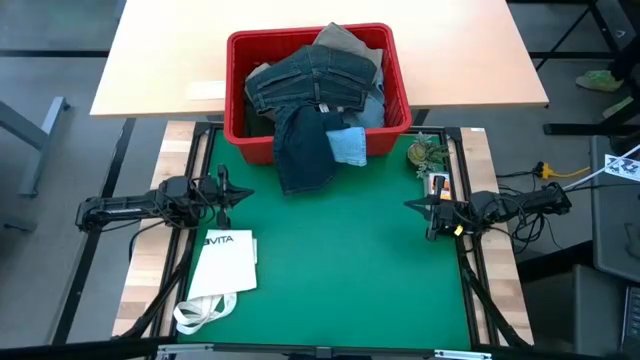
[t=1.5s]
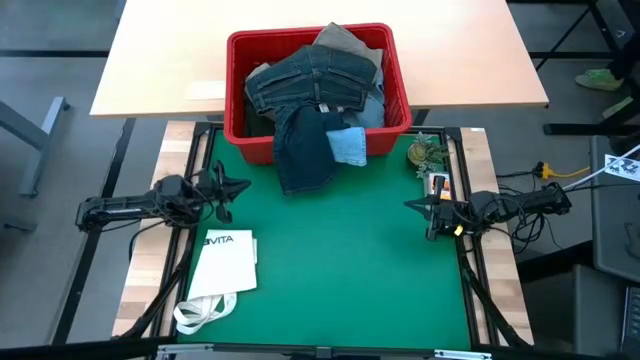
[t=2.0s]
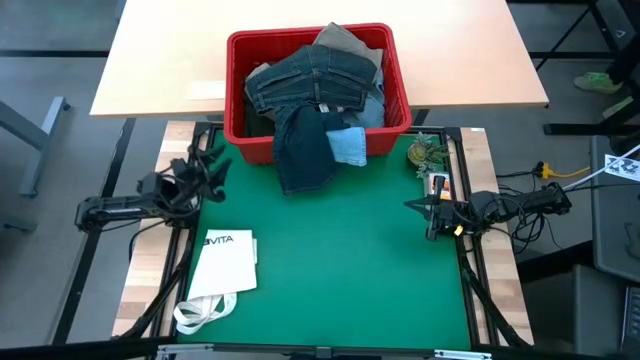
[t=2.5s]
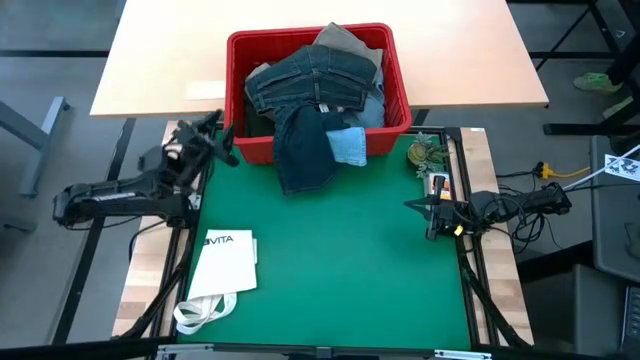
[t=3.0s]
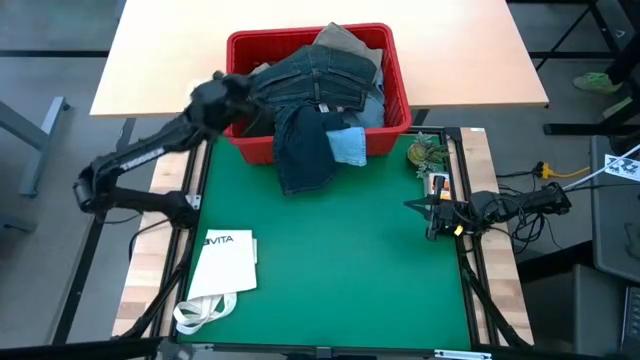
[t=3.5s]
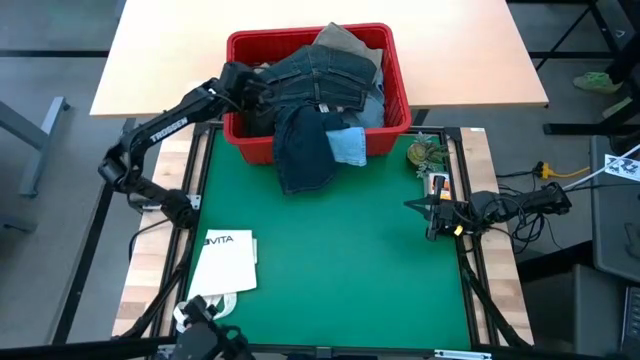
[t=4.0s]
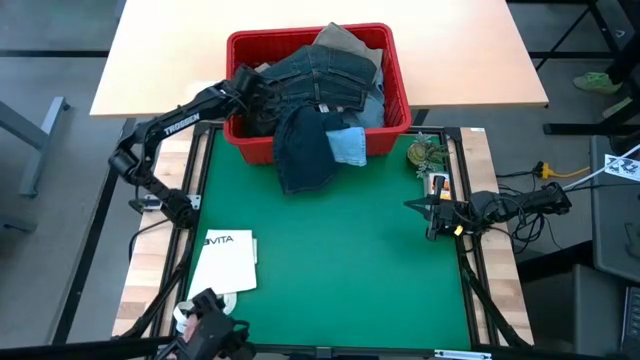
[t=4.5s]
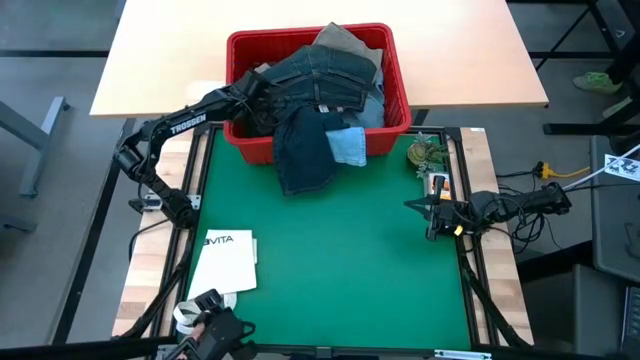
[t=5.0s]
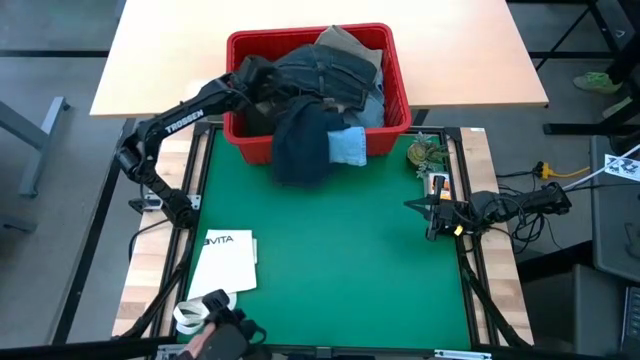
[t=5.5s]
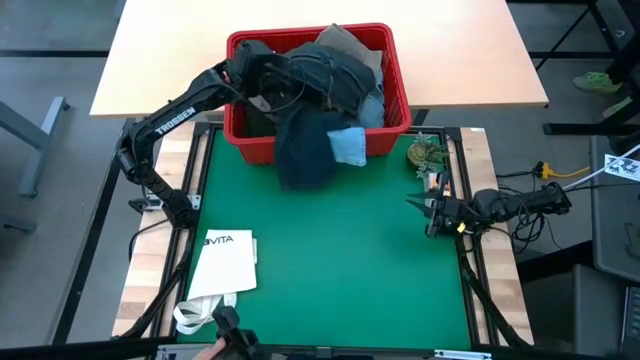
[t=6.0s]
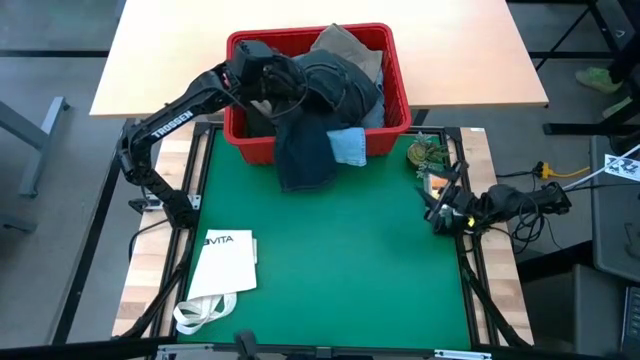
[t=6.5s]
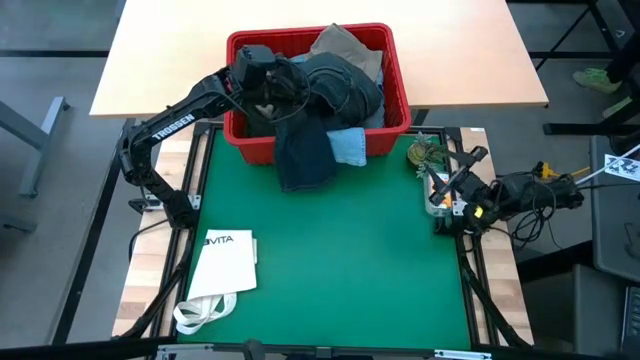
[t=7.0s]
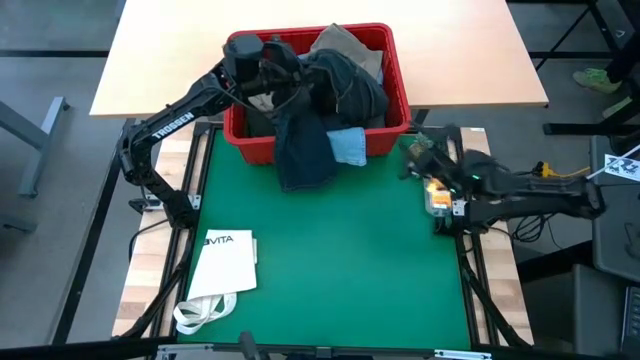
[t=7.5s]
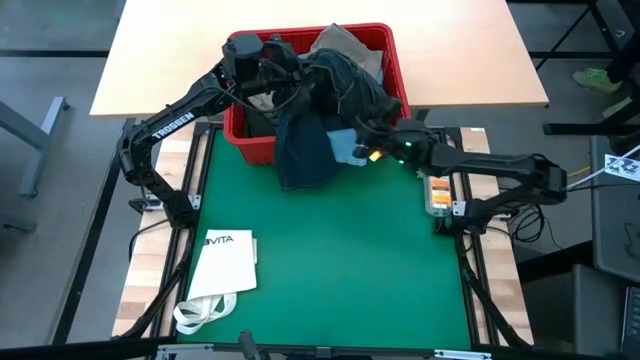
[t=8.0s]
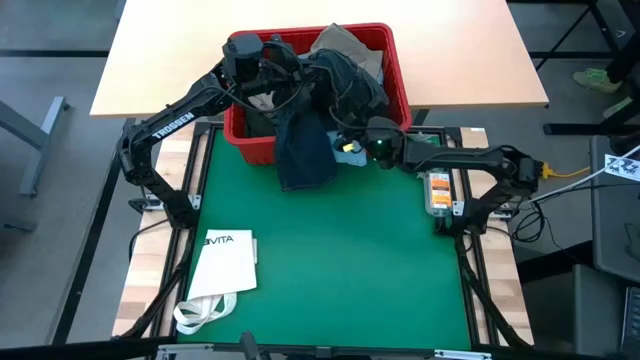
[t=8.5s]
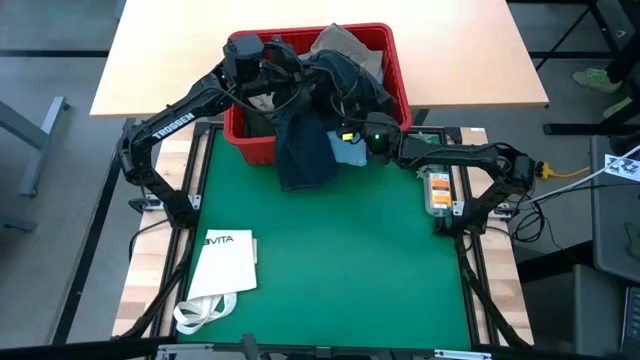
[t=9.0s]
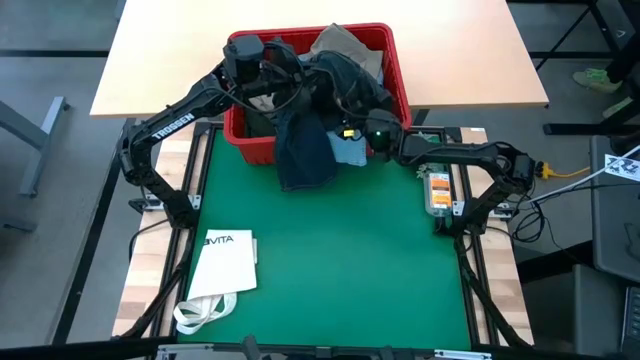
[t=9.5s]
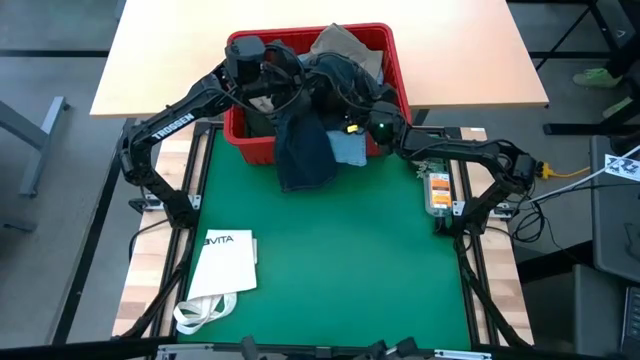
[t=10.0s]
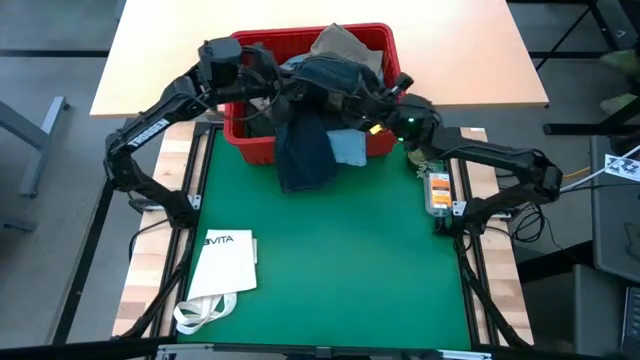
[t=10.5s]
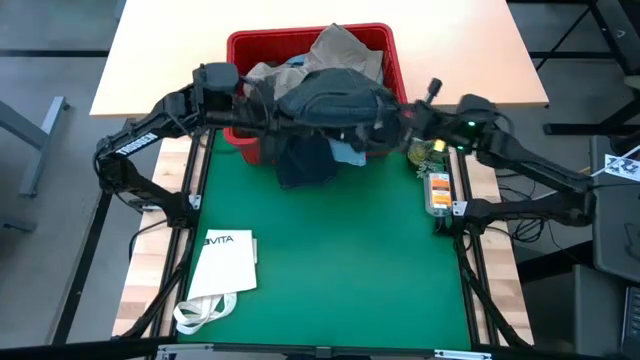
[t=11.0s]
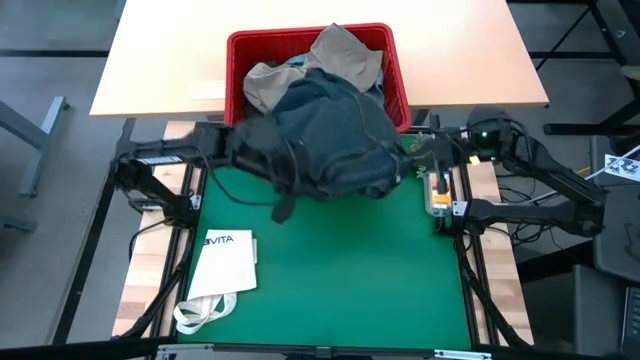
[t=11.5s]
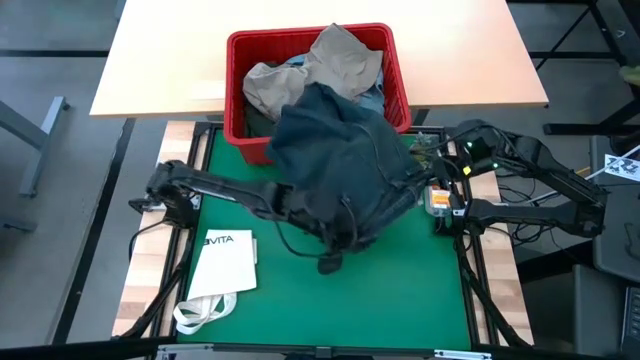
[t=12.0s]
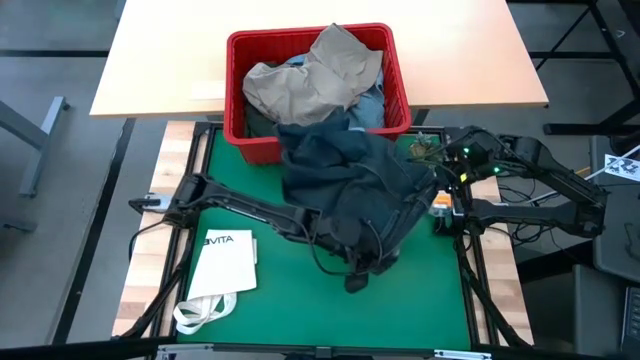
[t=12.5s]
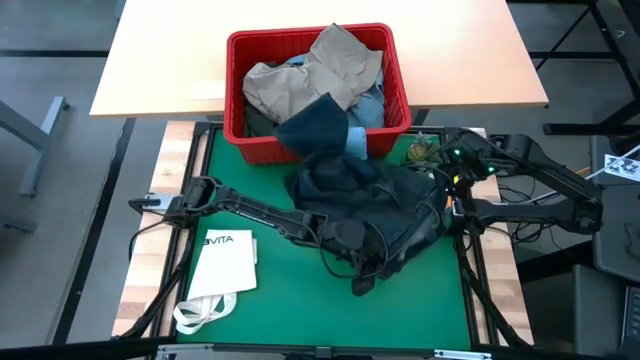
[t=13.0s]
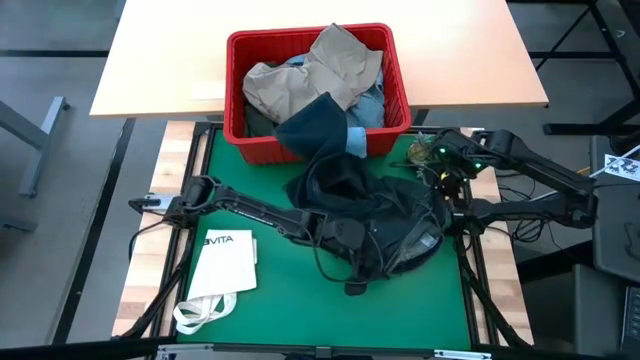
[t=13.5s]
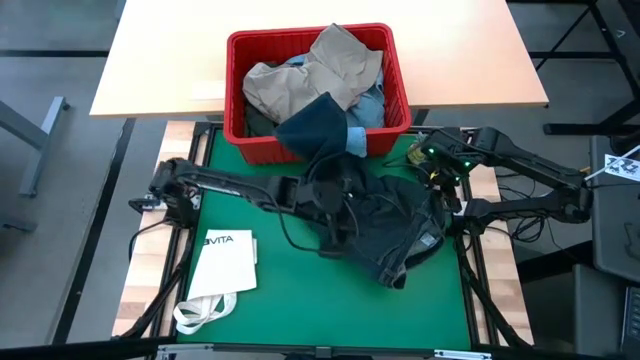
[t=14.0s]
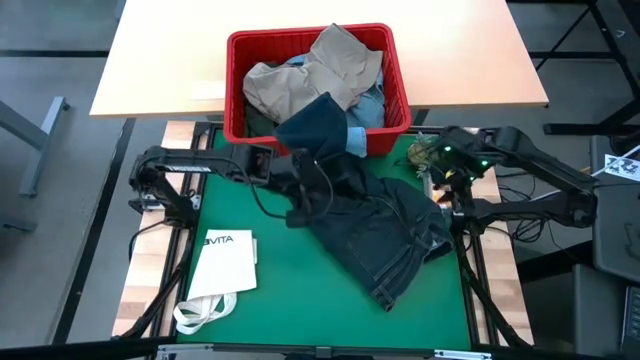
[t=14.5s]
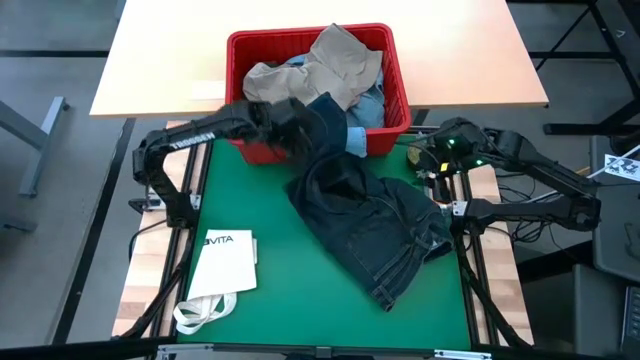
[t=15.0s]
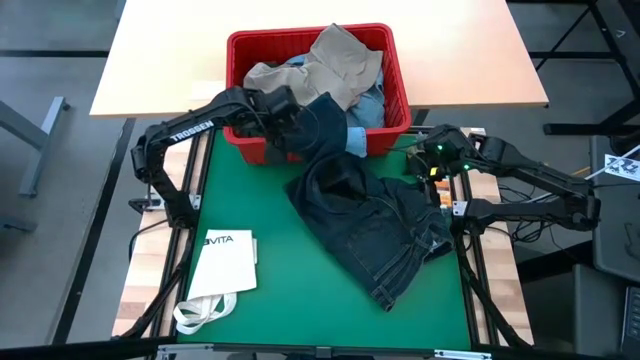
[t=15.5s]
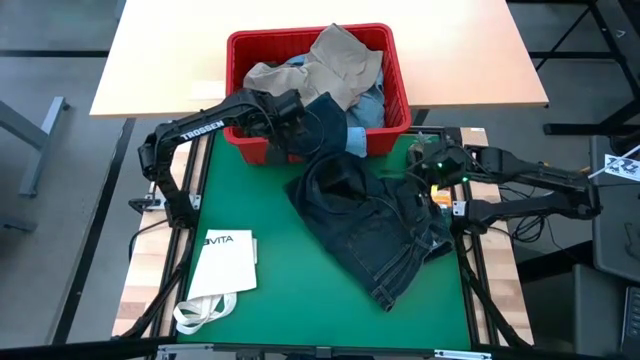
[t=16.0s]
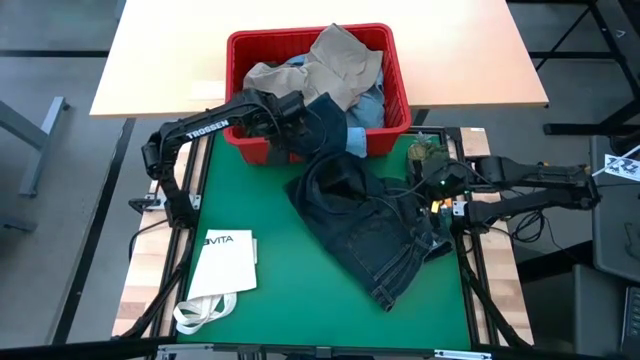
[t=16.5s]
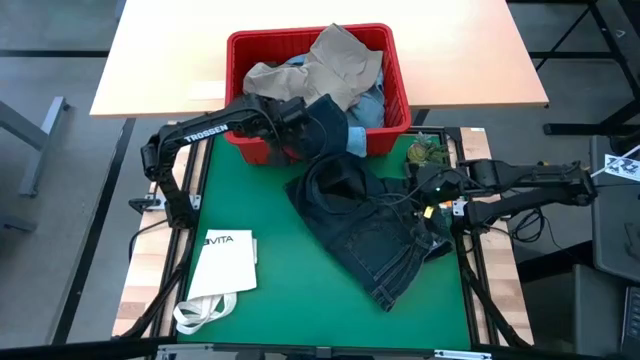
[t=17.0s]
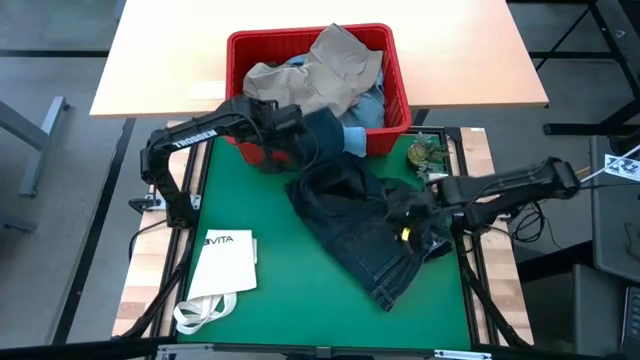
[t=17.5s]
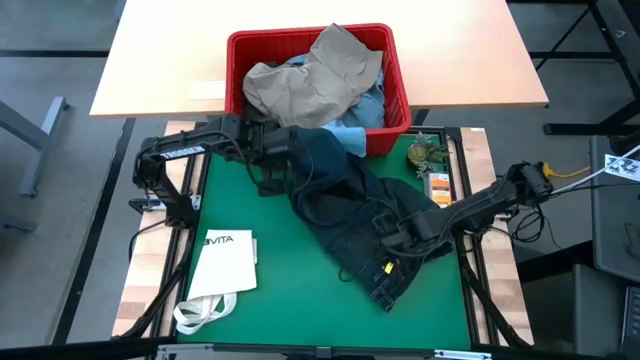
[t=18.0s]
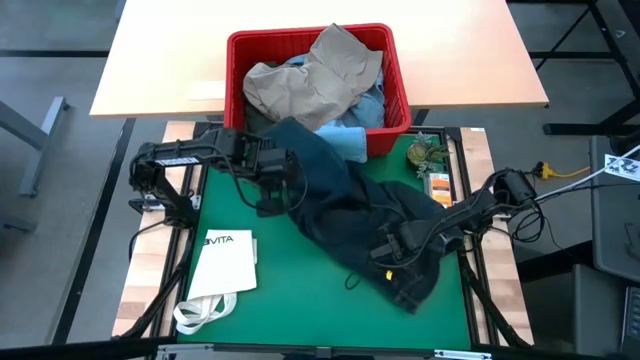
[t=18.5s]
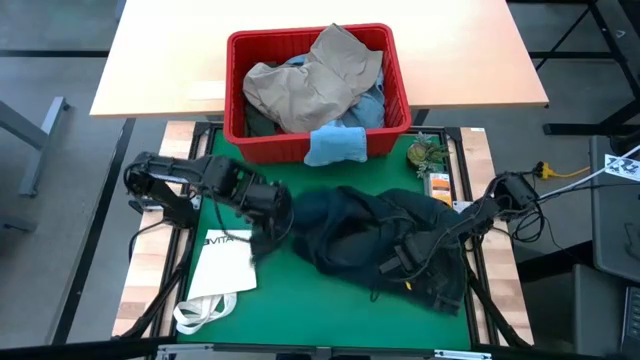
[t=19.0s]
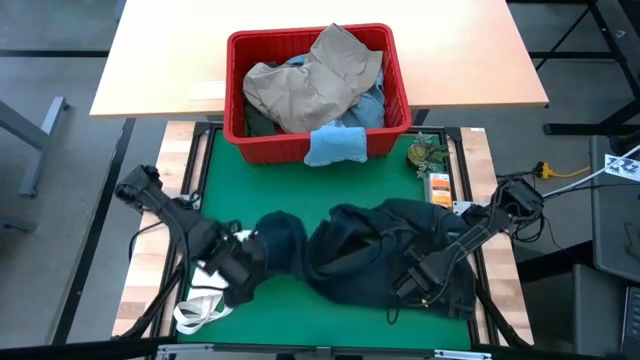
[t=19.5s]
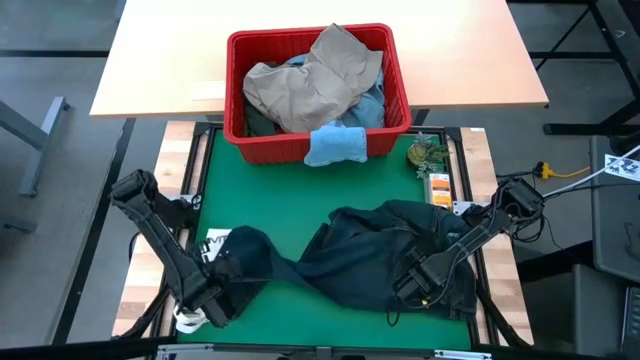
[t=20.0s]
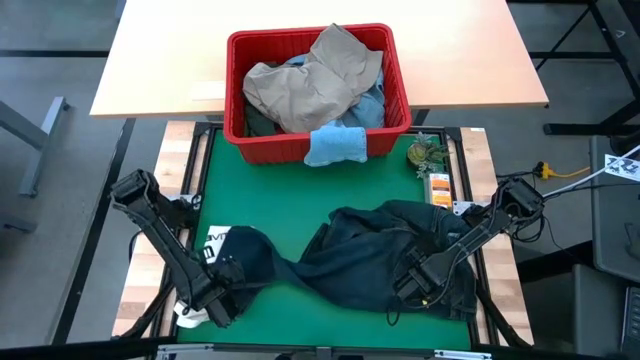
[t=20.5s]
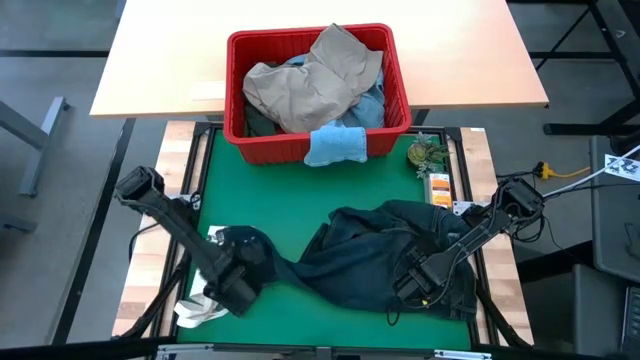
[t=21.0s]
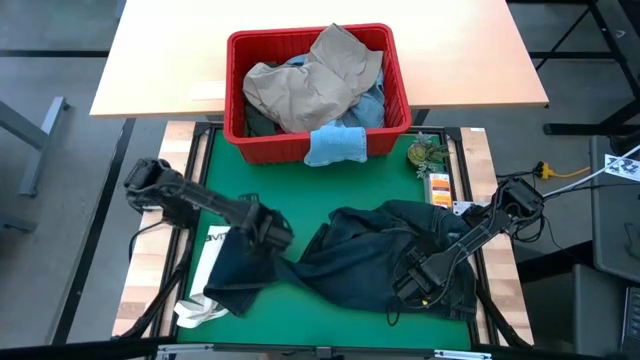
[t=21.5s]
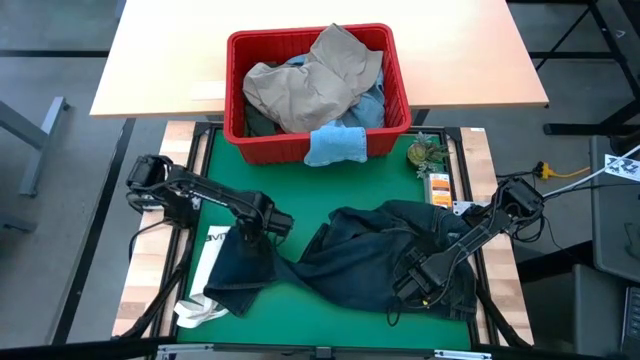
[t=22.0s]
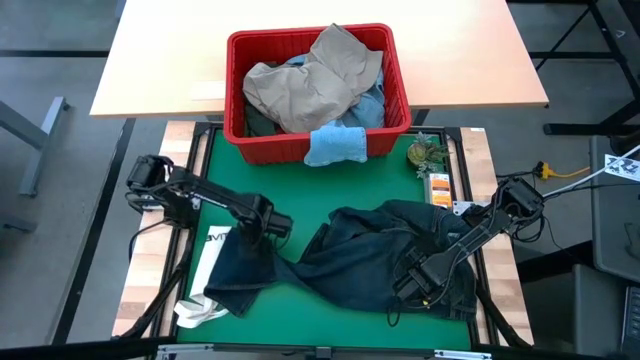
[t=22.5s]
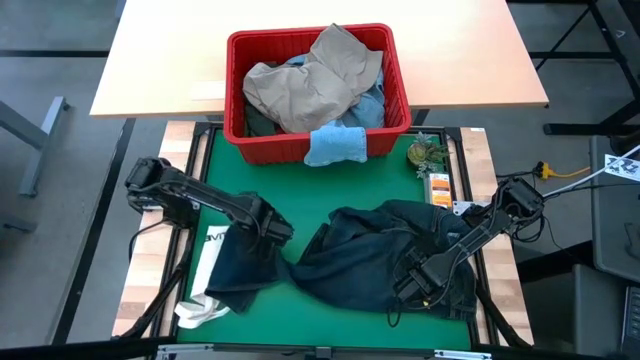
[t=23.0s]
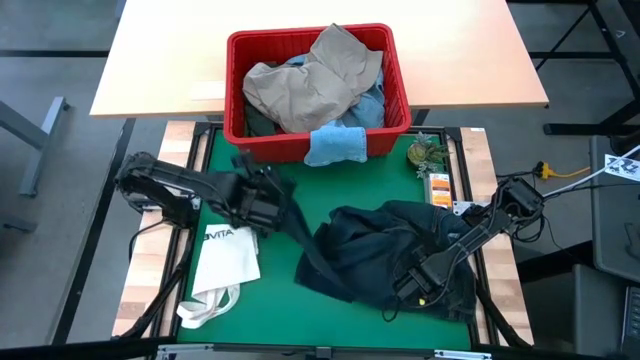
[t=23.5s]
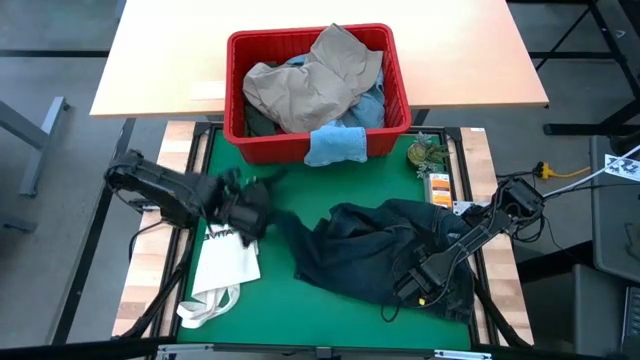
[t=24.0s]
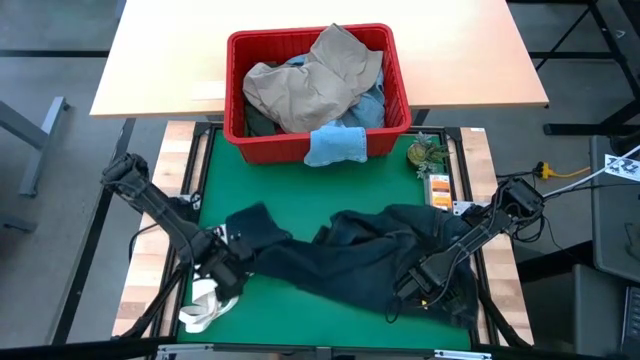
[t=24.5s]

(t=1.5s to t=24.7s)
Task: Fold Laundry from Bin
Fold the dark blue pants
